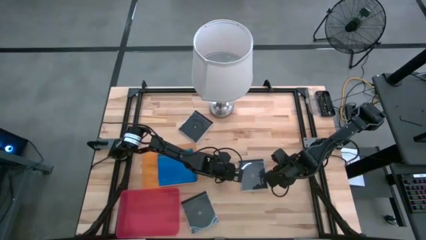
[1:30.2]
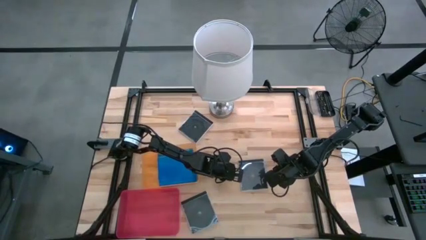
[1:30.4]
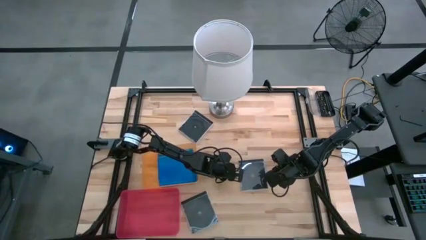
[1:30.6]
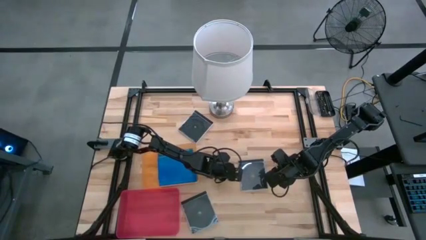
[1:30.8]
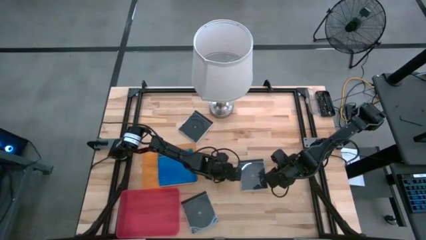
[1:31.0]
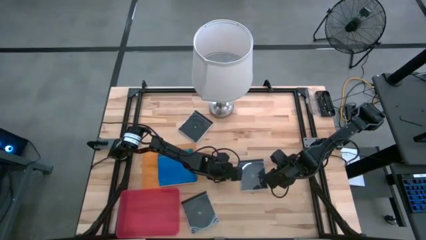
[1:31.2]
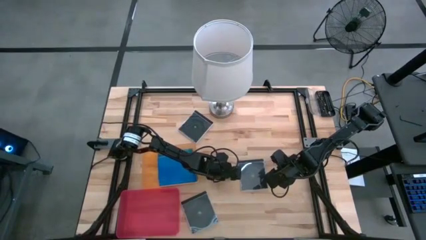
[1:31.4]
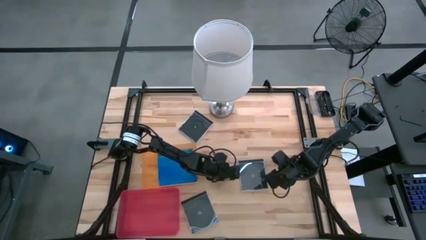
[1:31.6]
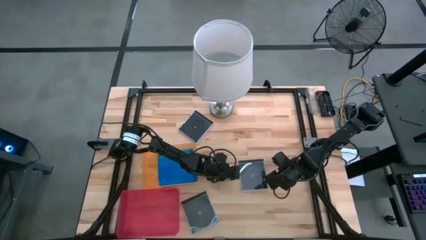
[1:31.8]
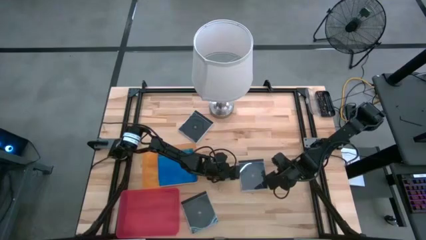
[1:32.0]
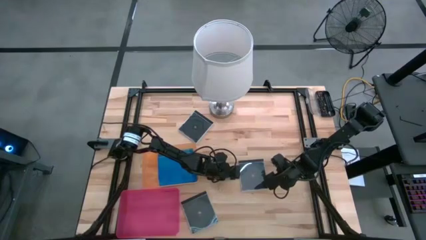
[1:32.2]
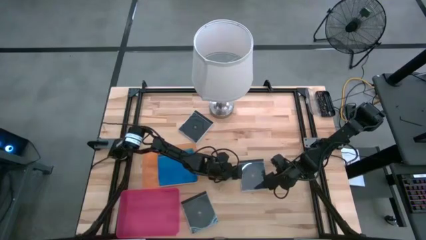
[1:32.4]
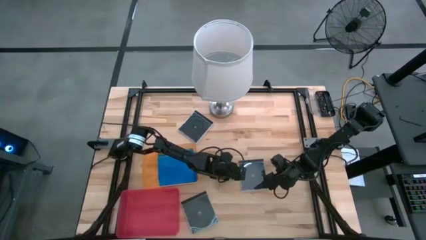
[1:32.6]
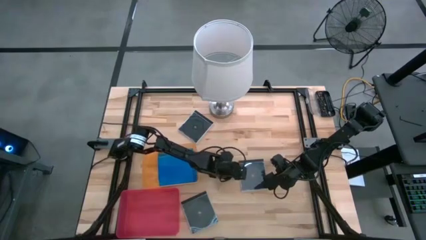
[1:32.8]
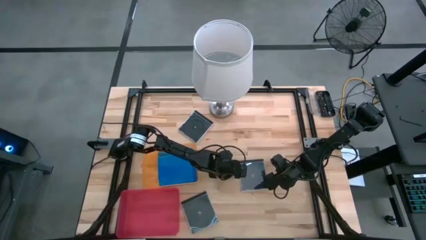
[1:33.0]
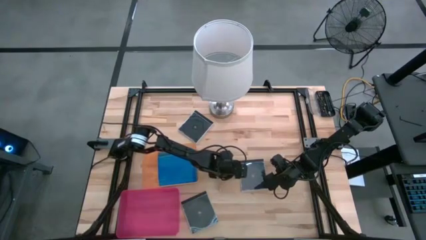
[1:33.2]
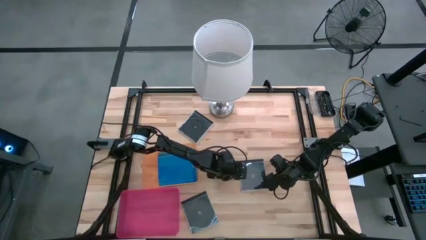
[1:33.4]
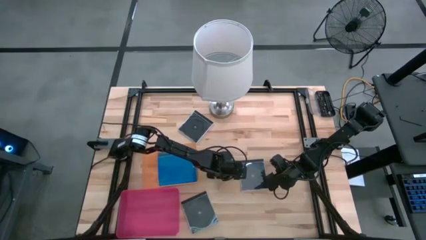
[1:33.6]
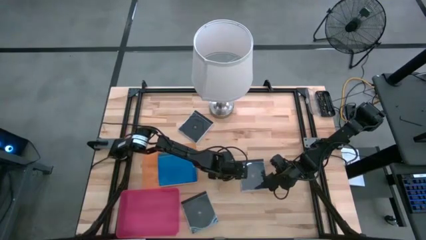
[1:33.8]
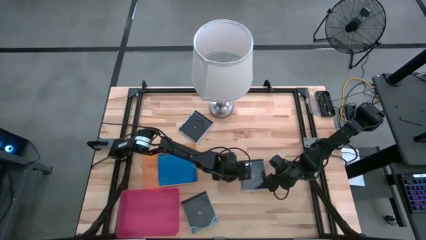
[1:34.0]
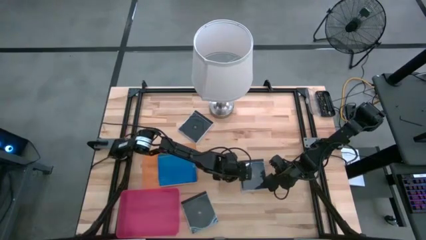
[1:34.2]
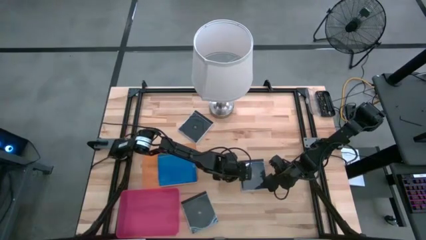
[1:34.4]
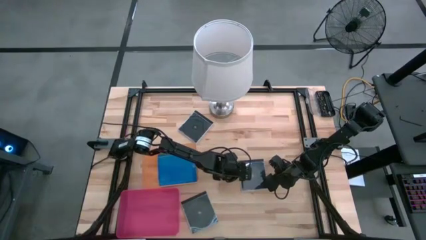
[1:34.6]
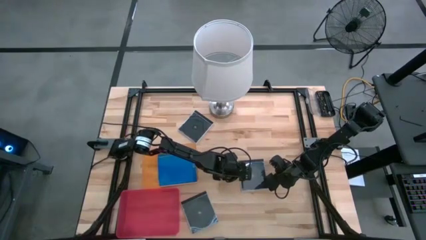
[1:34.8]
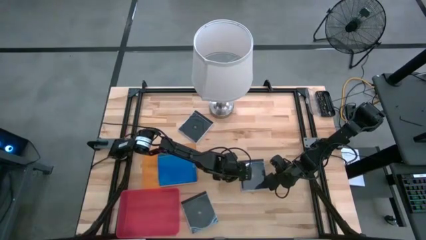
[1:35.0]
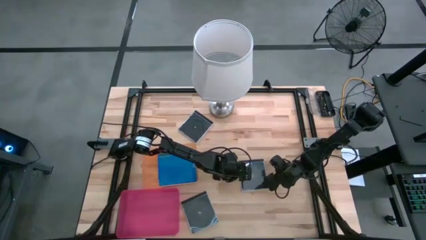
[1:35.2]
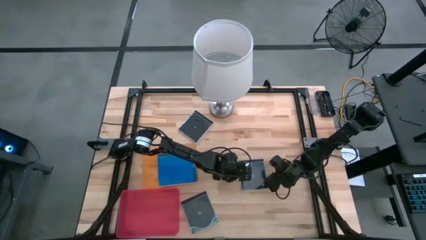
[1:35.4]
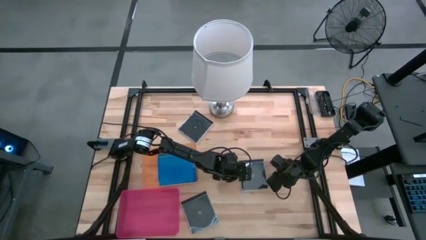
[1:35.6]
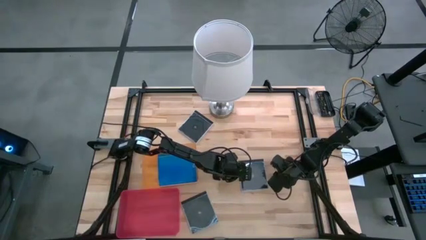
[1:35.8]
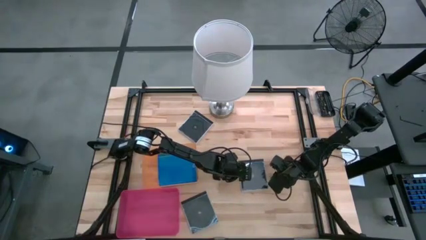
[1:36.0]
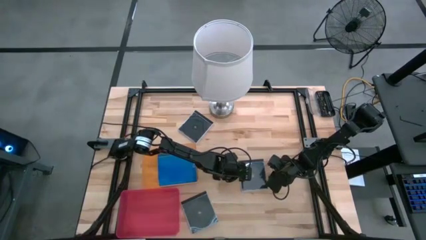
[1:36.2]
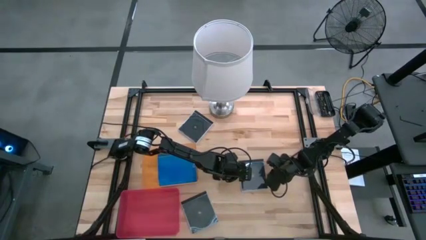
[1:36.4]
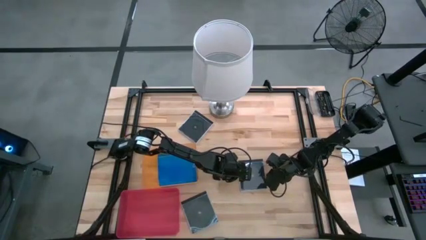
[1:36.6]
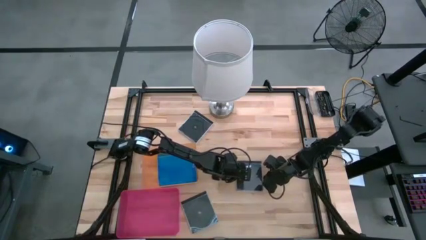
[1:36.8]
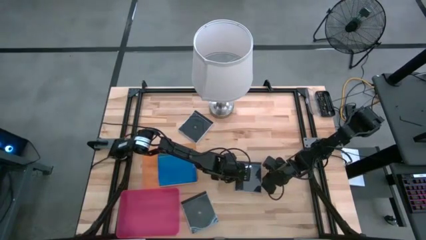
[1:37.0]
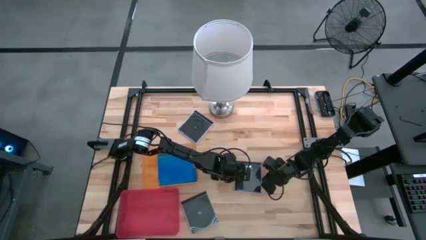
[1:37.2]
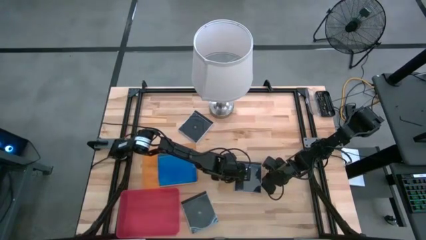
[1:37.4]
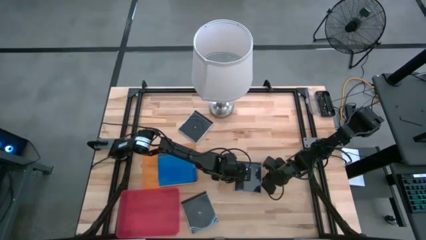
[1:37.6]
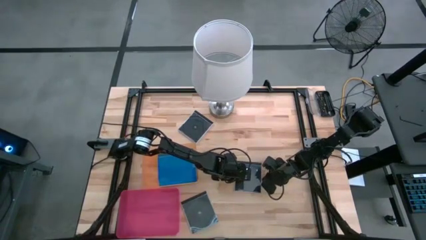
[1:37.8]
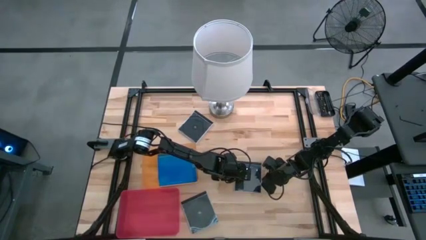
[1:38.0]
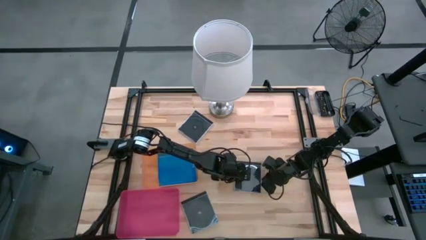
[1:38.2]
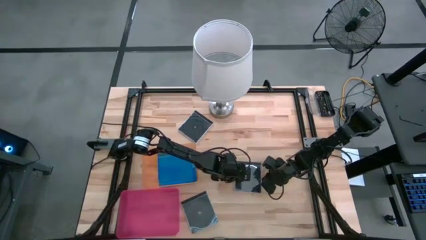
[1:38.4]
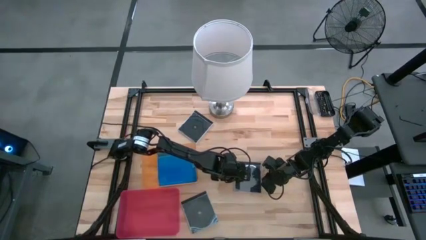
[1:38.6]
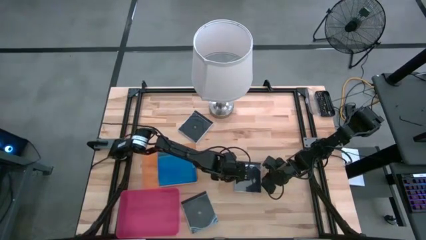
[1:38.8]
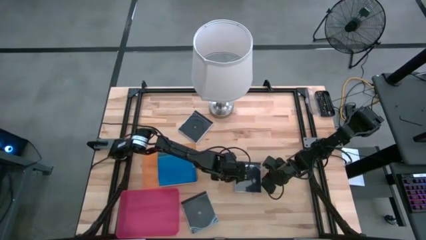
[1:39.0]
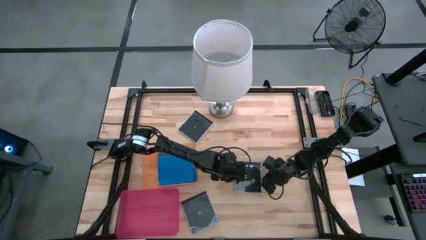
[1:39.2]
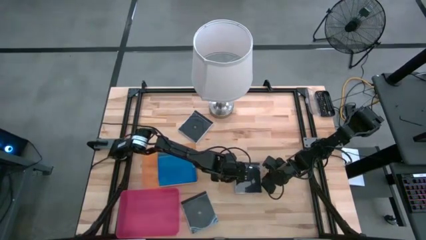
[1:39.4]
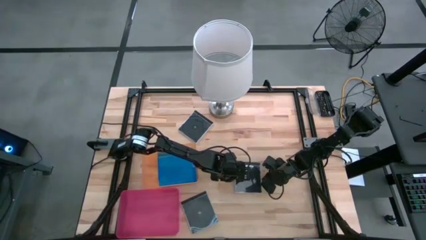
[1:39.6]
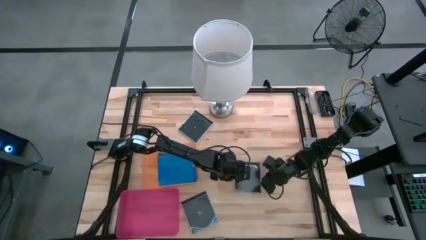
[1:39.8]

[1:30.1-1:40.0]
Task: Pick & place jewel cases by type
Put the middle black cd case into the pink bin

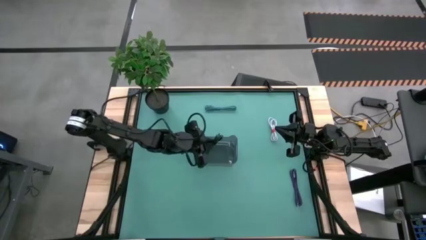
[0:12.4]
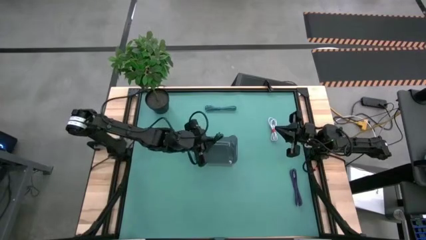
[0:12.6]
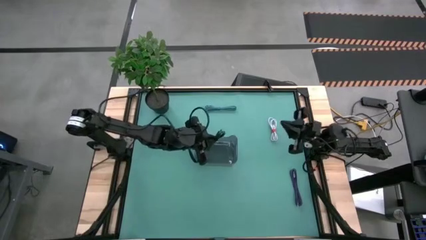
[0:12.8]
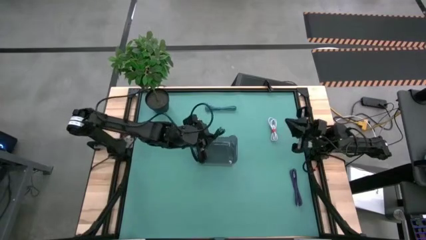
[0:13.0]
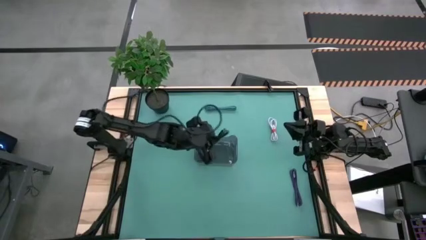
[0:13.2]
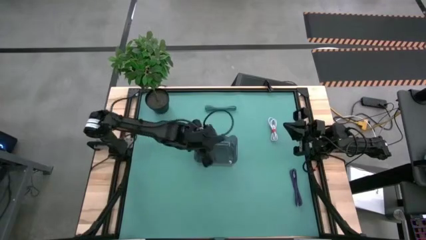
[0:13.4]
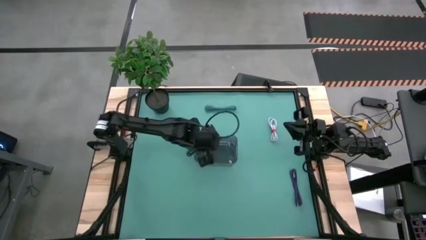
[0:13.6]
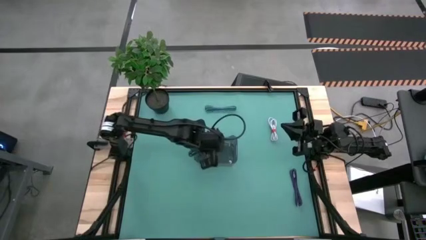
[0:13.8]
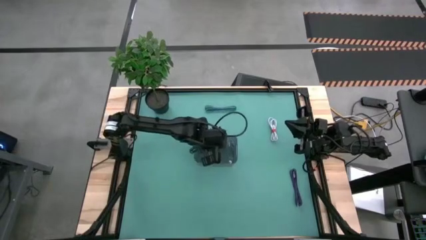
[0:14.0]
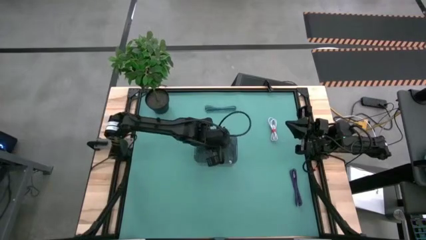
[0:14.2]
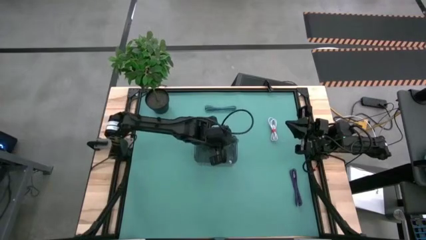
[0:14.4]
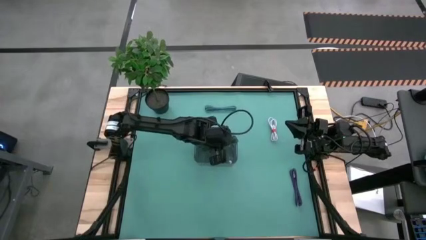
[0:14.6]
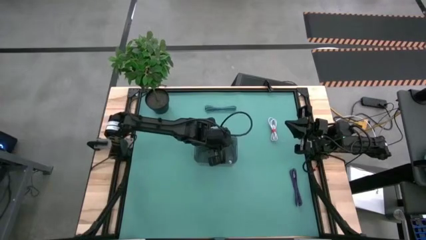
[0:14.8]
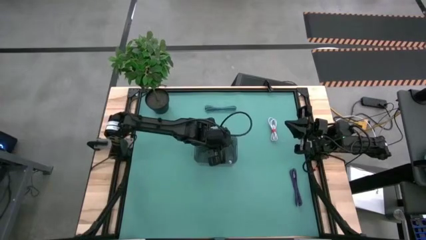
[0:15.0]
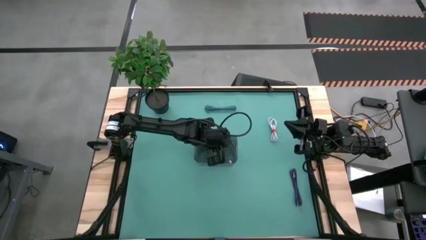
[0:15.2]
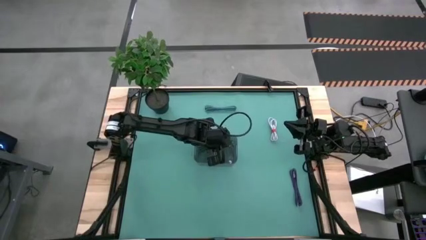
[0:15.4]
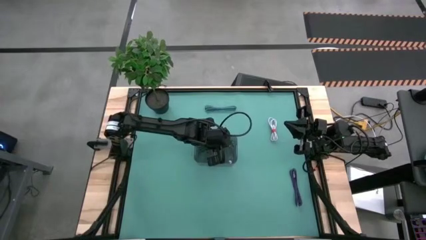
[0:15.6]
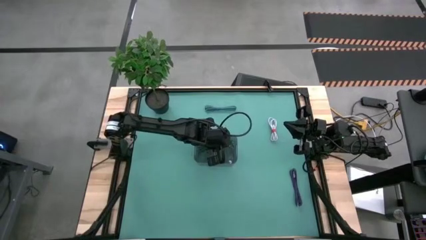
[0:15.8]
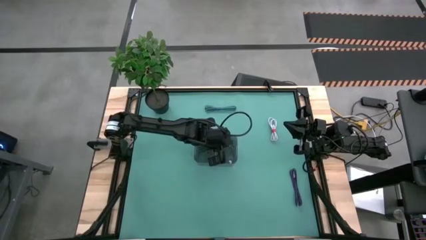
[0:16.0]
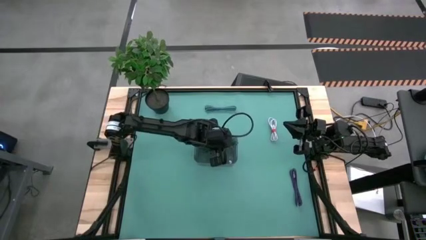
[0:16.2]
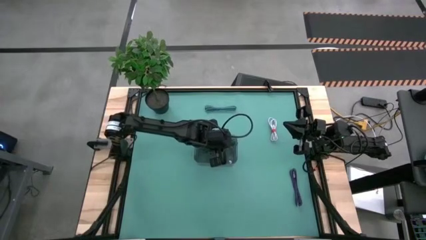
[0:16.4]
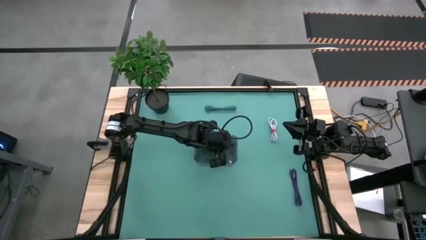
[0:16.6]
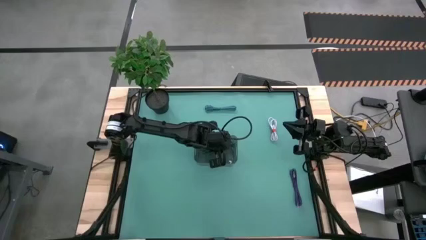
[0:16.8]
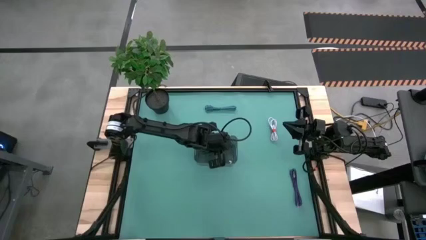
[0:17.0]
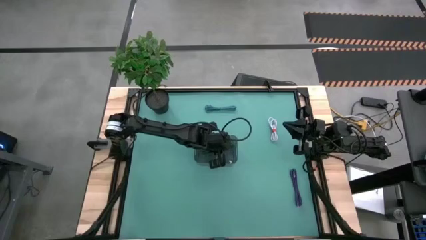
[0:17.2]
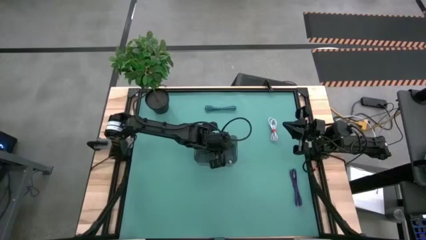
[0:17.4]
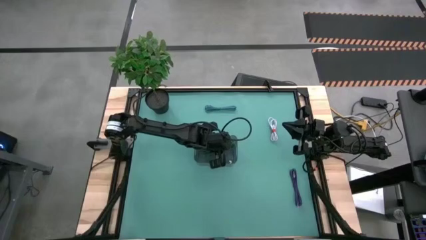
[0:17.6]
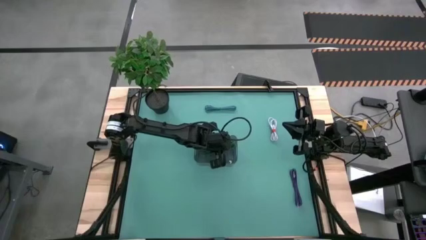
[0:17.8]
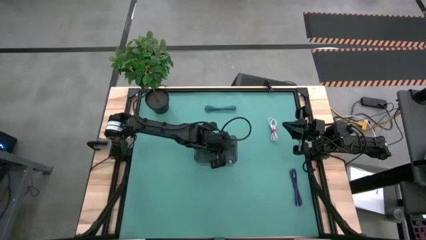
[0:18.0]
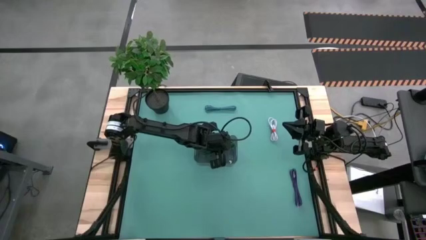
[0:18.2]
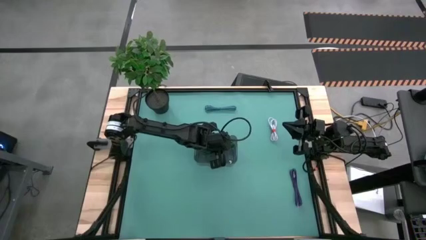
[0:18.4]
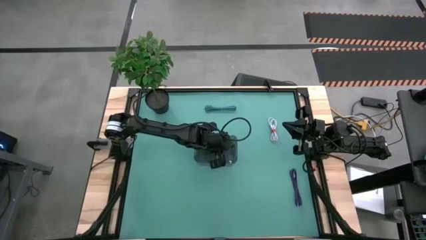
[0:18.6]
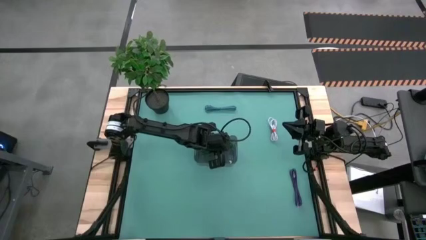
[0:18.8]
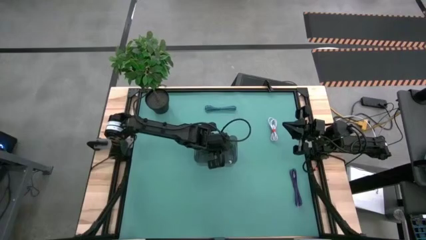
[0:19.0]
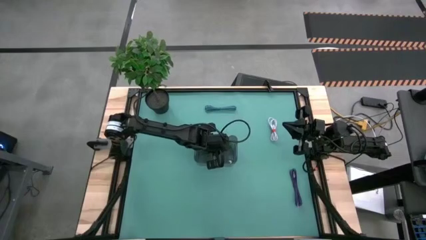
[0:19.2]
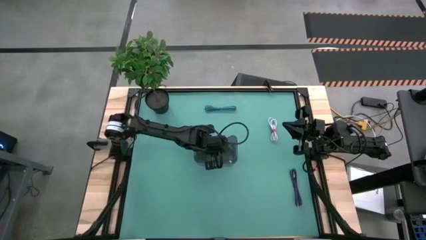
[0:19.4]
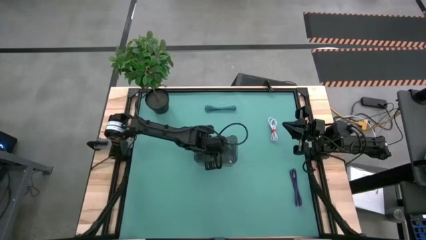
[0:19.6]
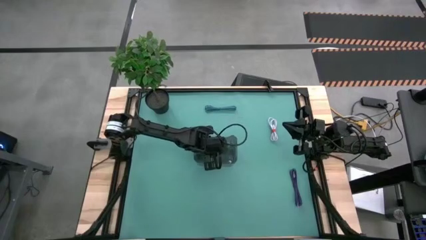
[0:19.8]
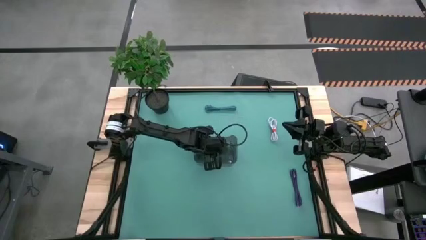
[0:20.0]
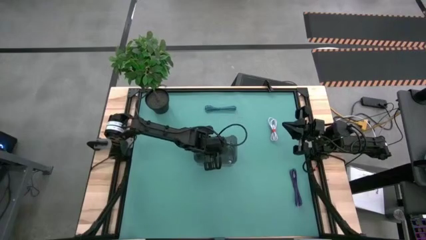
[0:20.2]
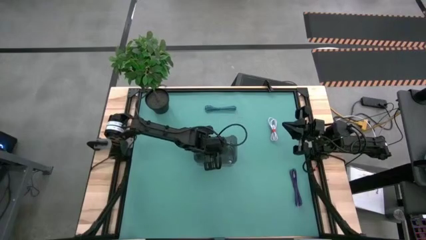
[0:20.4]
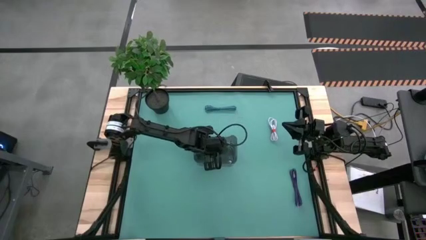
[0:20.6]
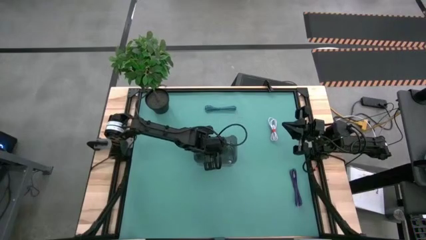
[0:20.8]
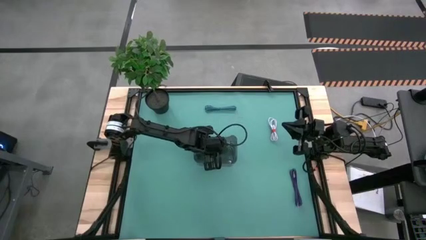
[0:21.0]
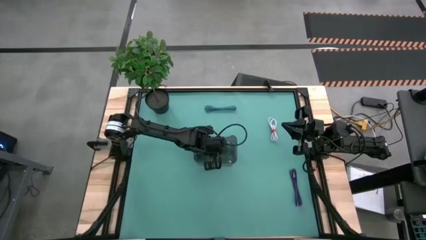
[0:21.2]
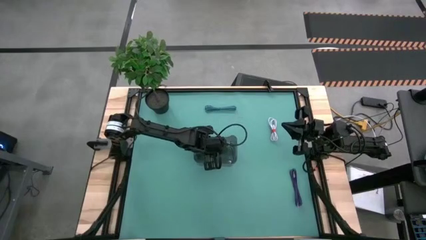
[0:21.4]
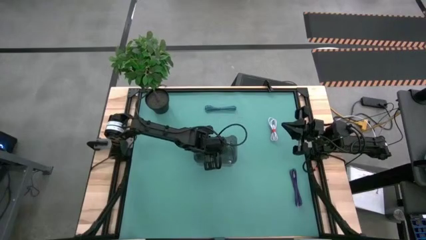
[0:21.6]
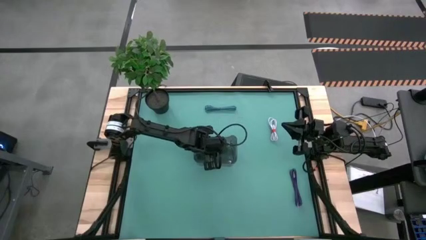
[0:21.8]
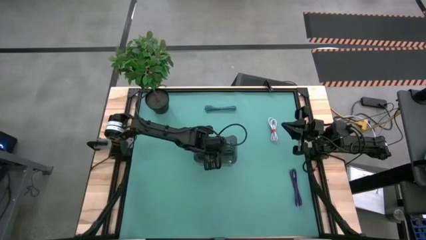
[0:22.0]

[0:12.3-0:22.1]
Task: Pick and place USB-C Cables
Put the green cable into the black transparent container
